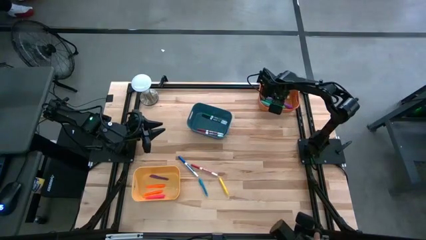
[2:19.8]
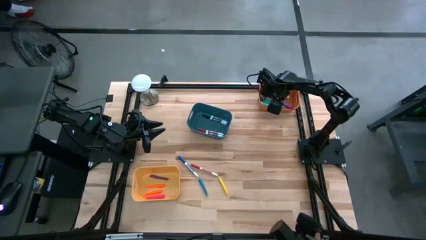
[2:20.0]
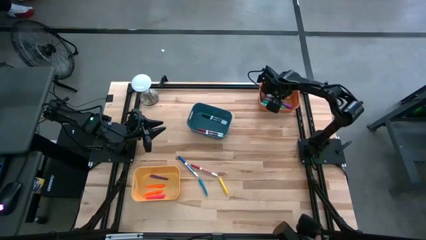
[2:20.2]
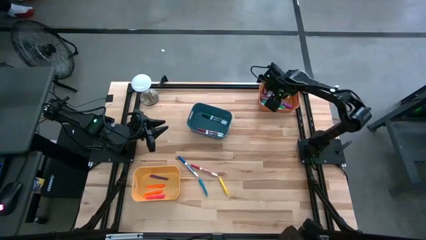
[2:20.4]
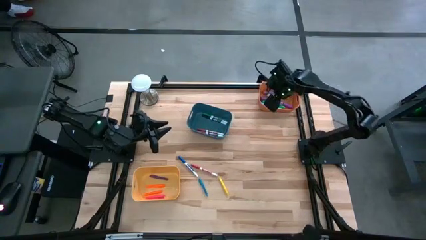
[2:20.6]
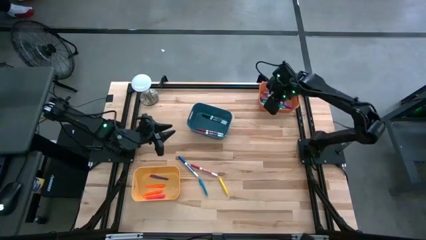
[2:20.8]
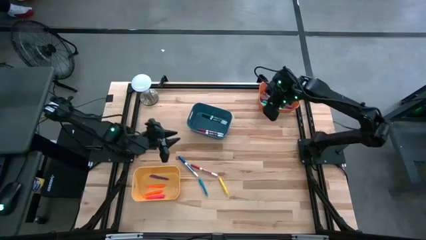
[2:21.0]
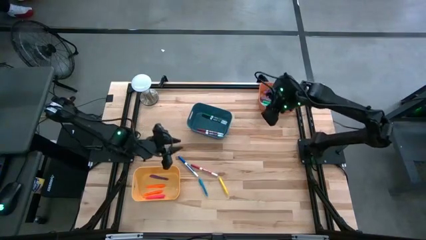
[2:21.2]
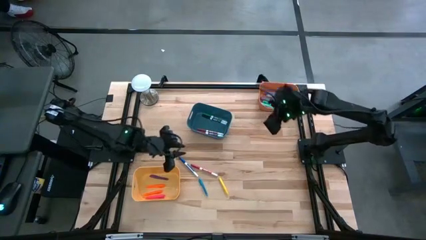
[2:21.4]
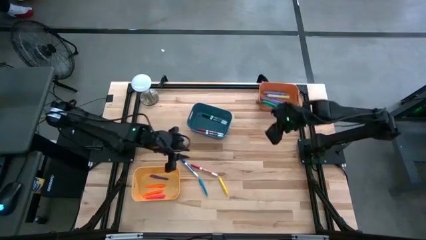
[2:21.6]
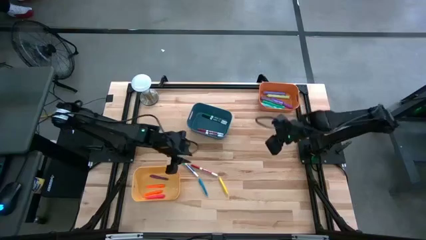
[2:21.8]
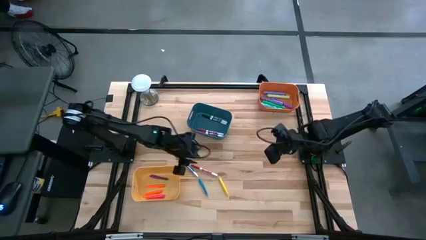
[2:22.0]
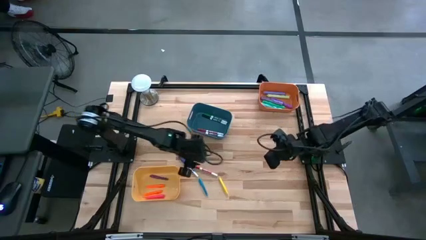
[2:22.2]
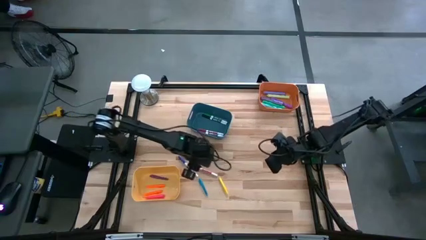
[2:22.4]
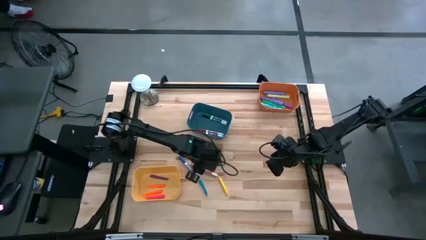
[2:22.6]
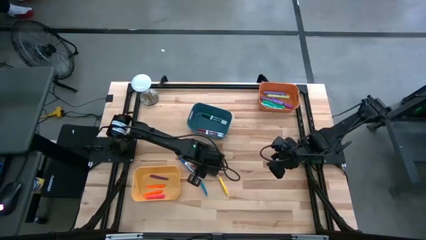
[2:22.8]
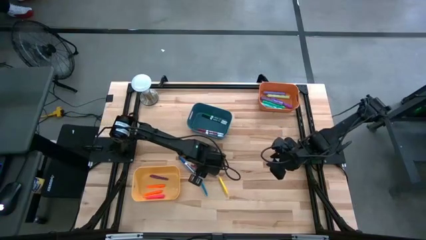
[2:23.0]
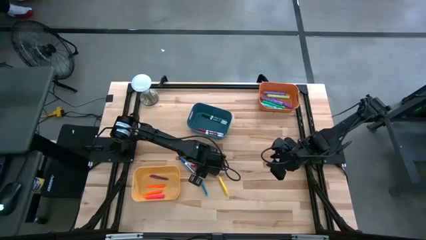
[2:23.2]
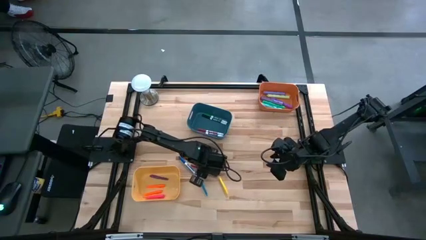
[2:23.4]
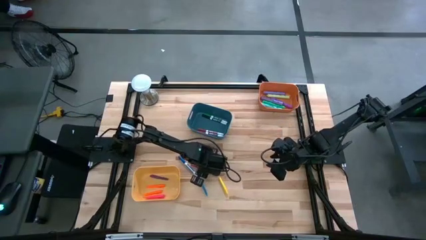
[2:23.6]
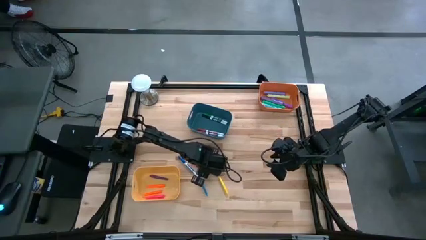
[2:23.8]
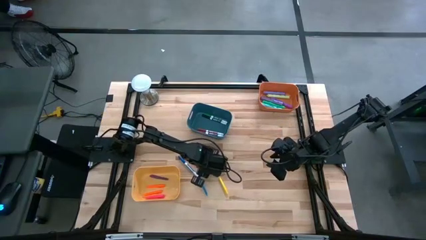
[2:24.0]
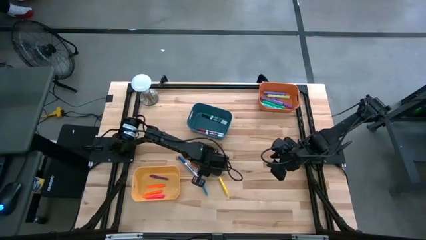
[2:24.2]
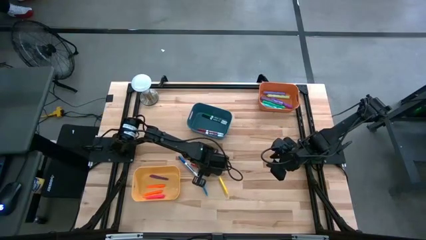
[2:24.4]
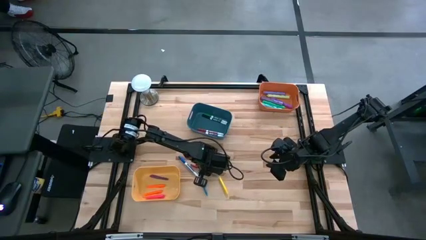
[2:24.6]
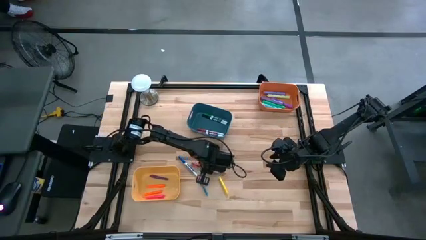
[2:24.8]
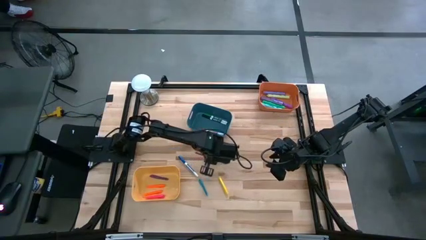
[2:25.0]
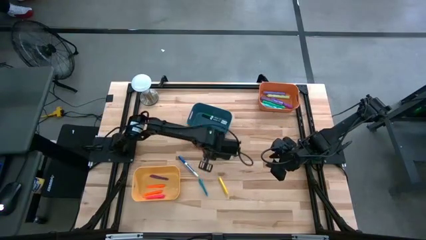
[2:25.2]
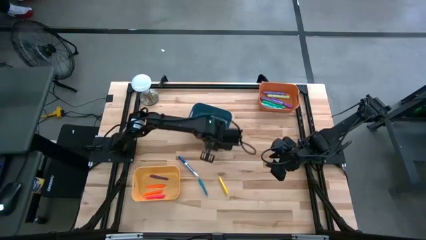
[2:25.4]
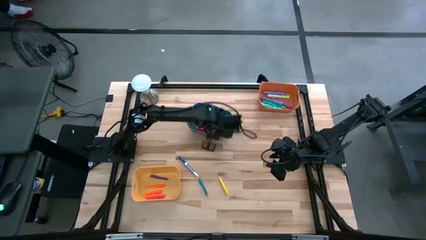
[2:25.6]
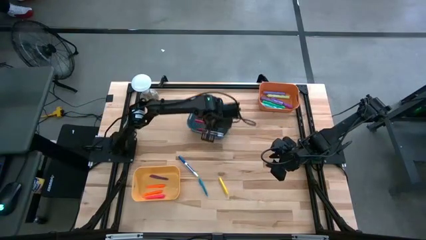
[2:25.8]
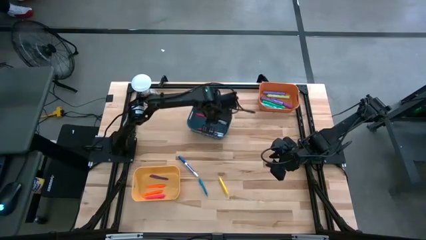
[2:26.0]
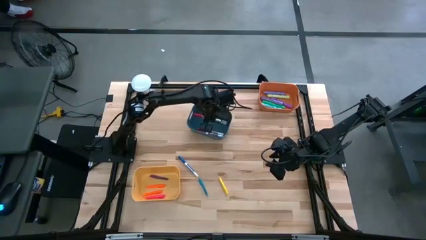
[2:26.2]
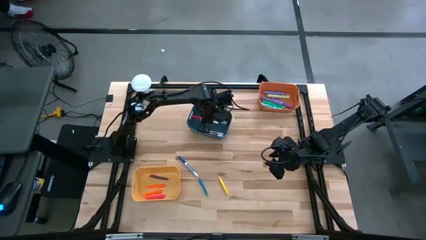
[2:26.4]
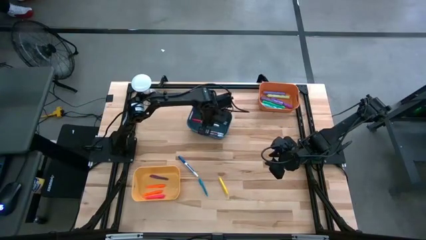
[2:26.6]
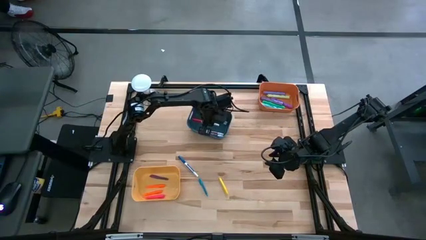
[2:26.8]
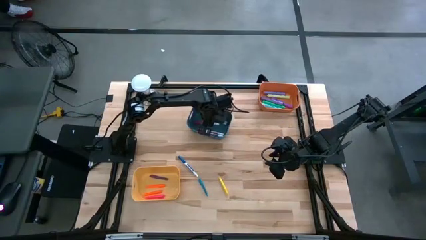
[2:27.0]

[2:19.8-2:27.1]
Task: Pick & Place Markers
Put the red marker pen into the blue bin

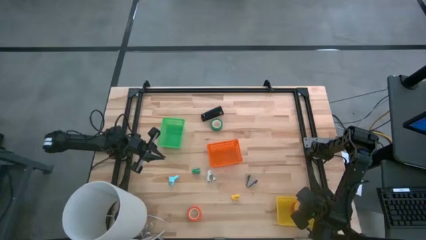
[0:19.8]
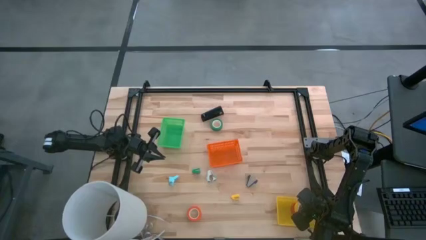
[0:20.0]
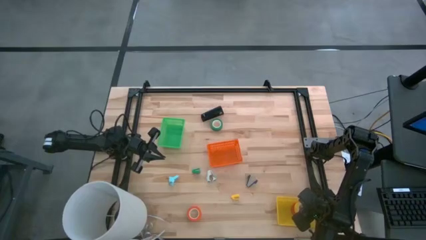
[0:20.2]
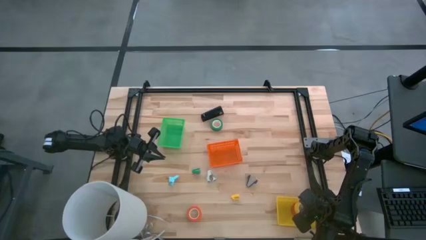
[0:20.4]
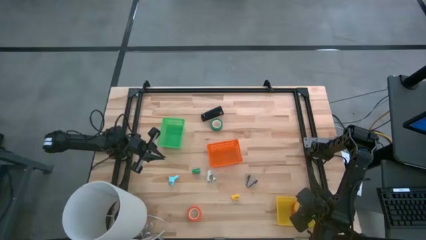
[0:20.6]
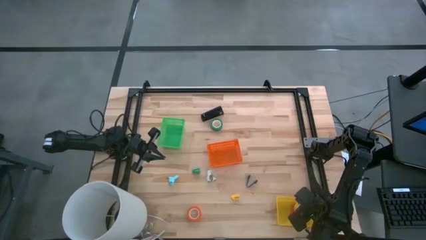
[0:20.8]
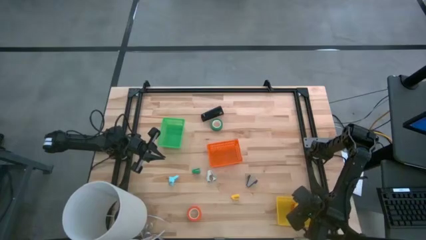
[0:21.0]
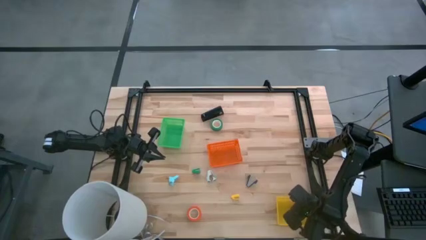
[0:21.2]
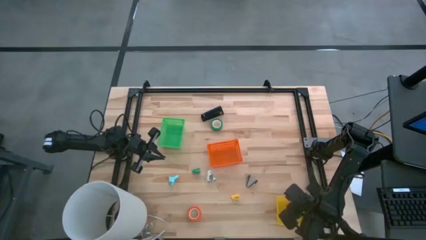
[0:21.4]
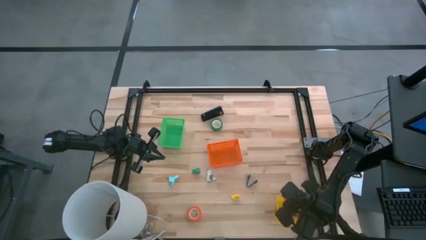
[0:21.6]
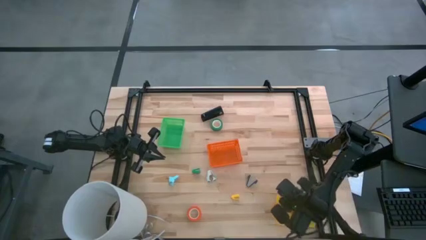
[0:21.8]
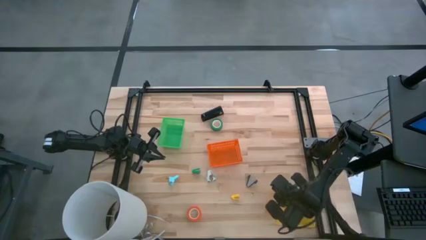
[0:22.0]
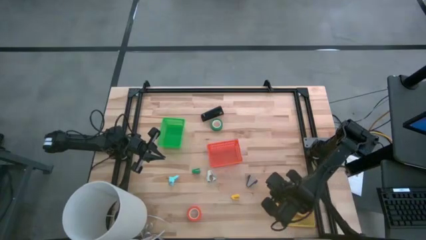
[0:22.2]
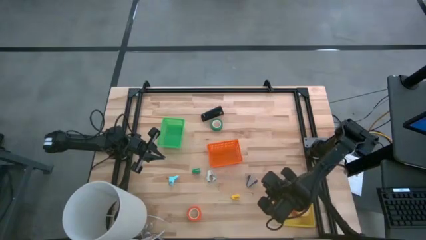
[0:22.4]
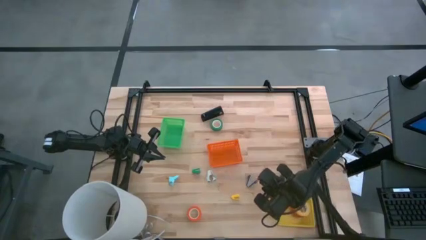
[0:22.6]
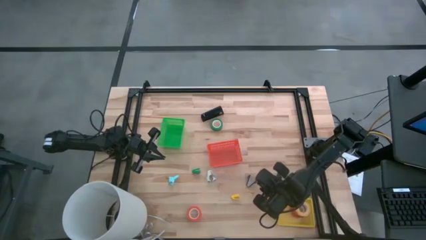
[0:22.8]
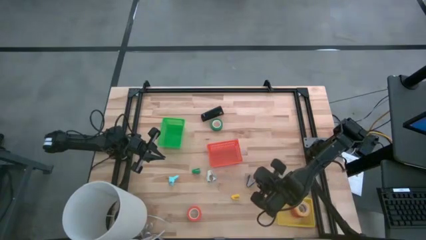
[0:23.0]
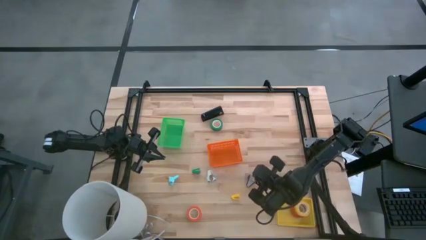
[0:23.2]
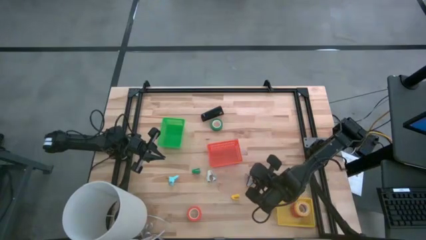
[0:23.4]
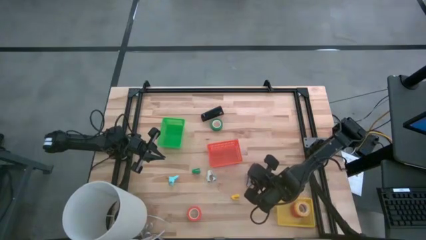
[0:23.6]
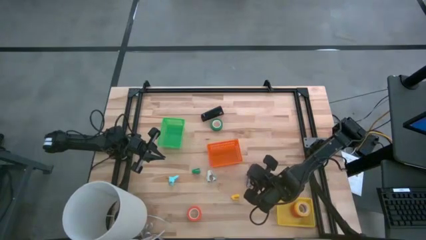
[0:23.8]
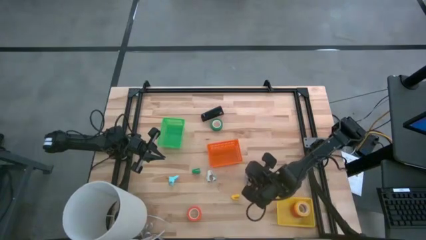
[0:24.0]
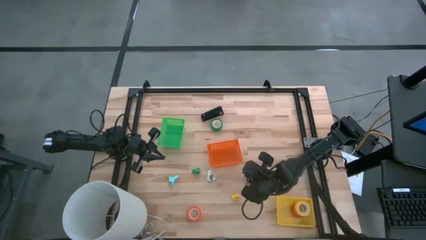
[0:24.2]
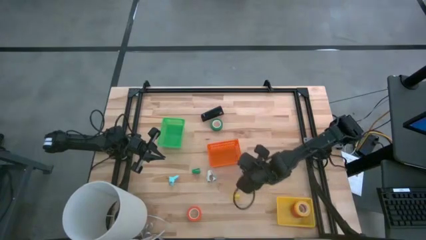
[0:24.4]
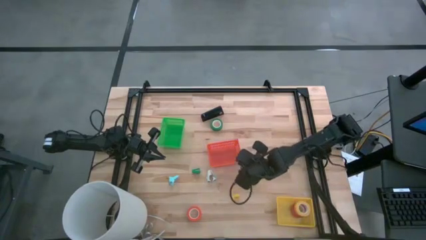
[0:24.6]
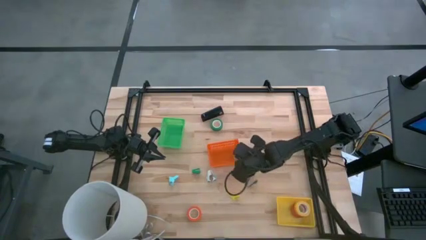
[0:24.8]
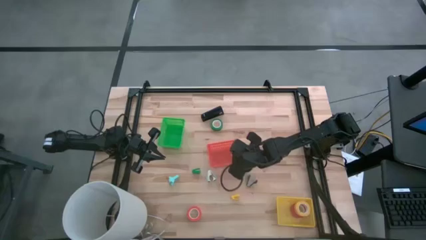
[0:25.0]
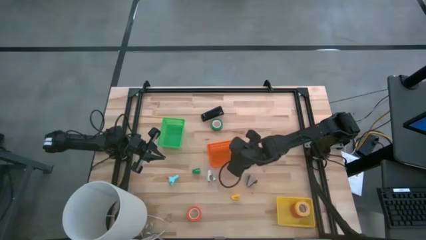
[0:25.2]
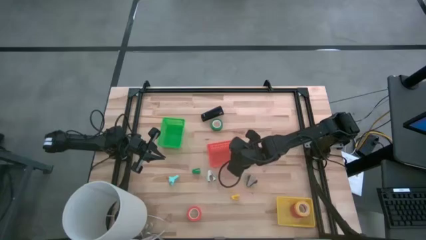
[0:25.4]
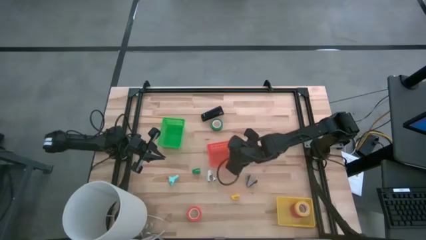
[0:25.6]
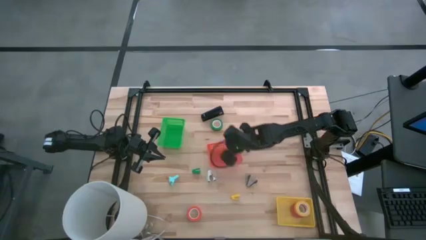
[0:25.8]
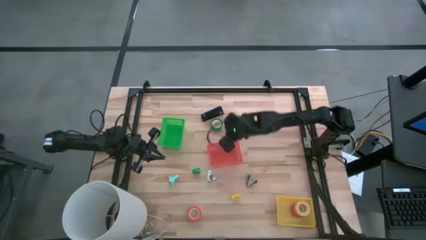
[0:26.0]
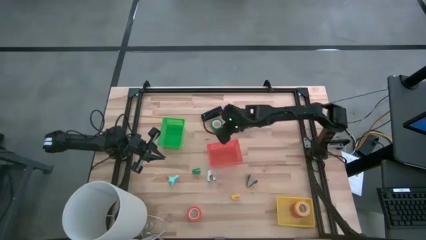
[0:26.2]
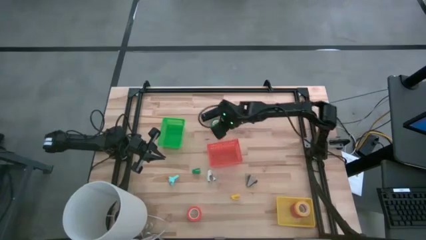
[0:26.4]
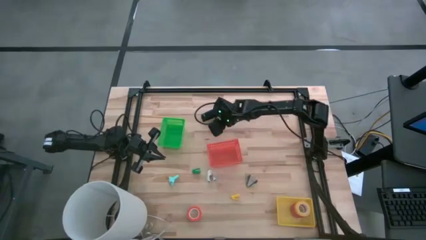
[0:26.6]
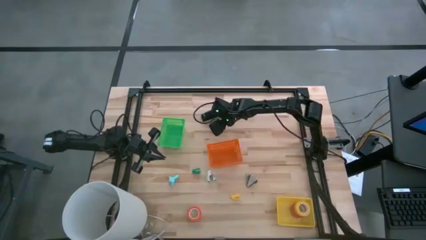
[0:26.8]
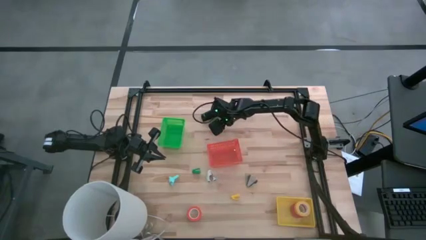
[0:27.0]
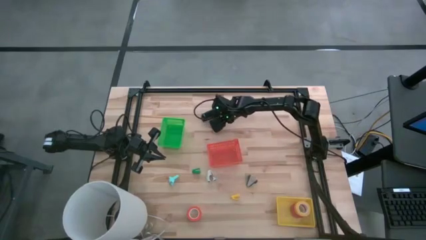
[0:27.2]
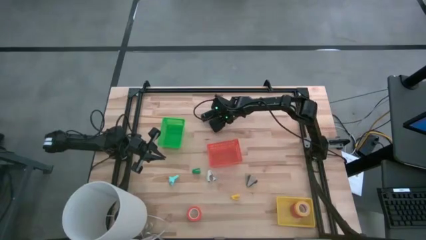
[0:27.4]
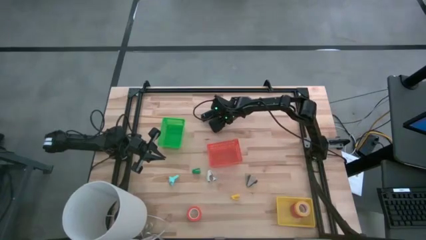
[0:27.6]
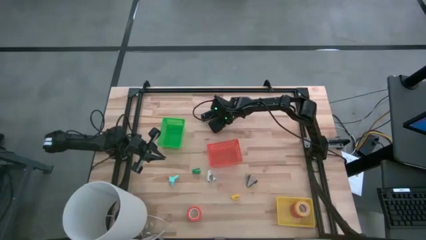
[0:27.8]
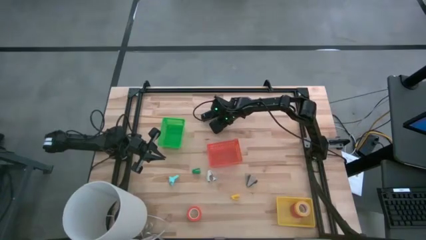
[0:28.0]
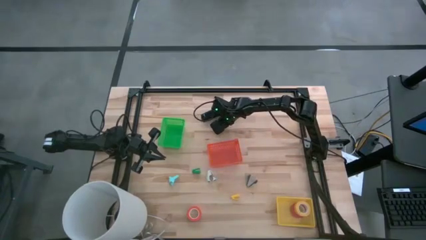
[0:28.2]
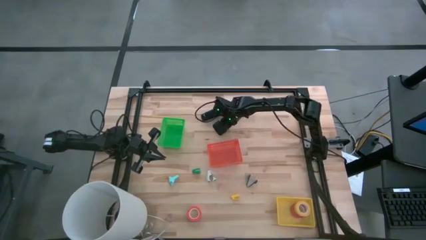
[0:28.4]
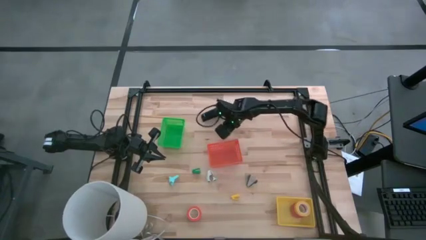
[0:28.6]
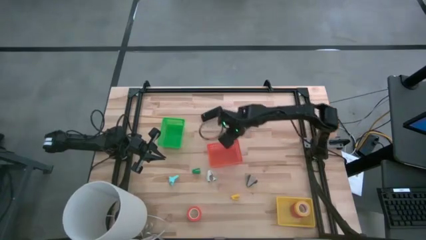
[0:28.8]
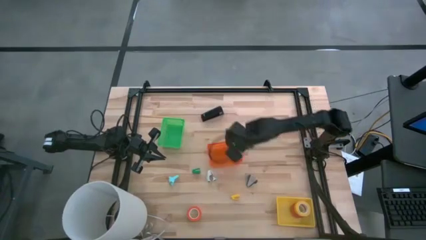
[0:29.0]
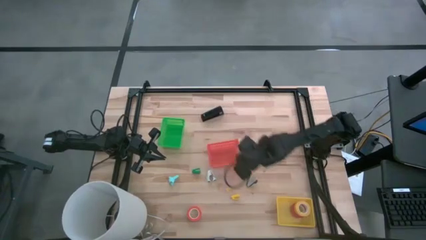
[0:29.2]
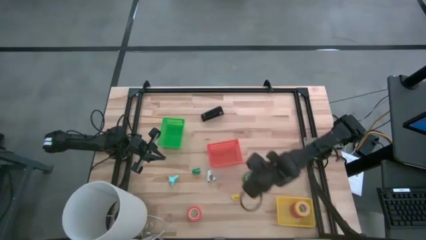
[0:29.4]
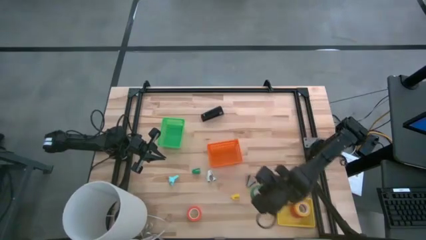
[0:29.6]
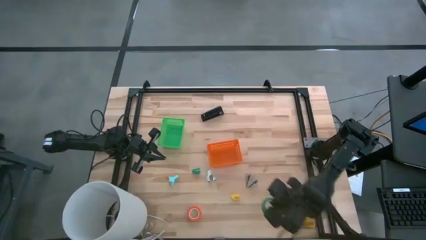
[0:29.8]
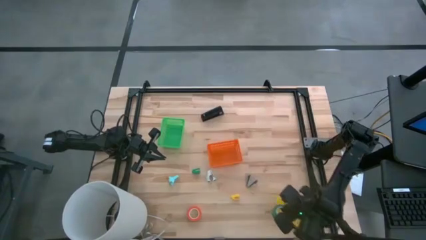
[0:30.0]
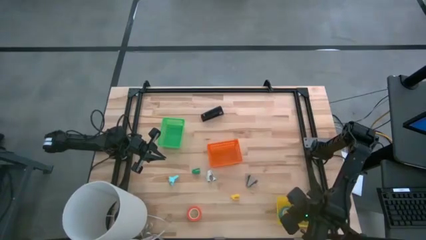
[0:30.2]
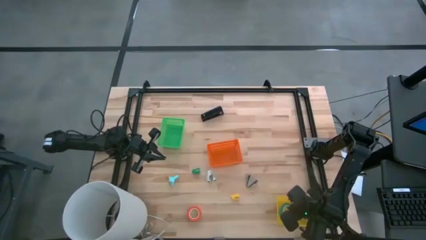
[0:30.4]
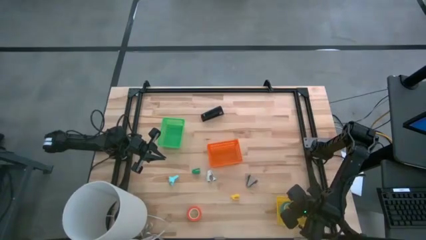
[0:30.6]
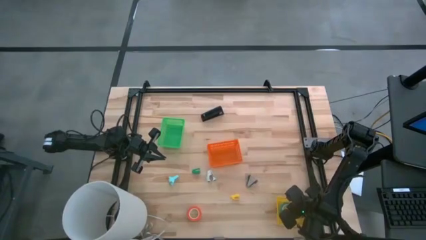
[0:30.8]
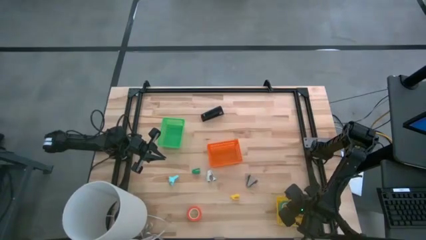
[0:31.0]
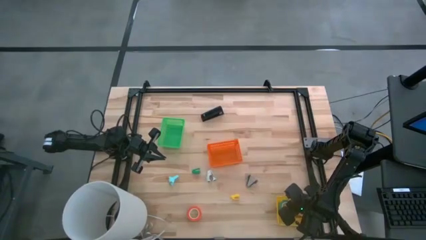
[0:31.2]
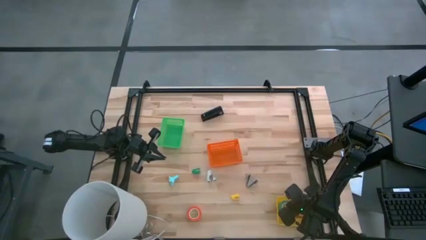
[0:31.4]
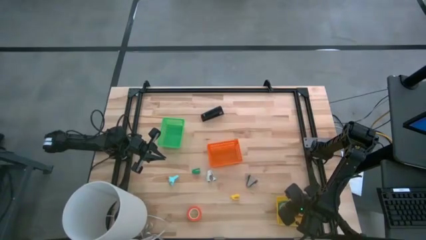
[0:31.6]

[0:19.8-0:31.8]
Task: Pick and place Stapler, Stapler remover, tape
Put the green tape into the yellow bin
